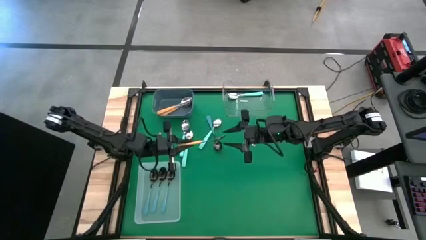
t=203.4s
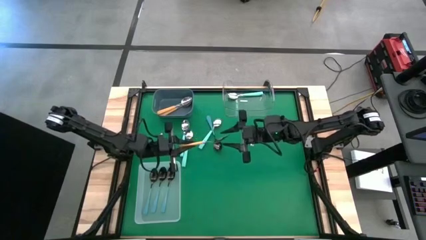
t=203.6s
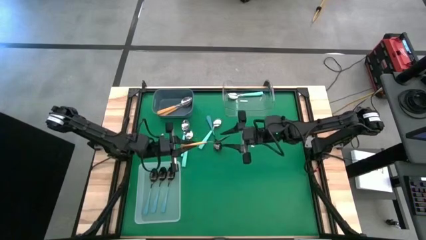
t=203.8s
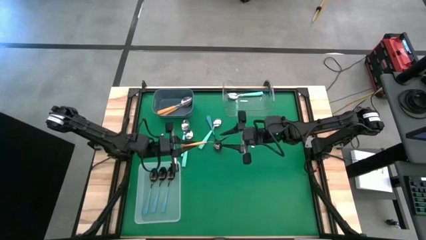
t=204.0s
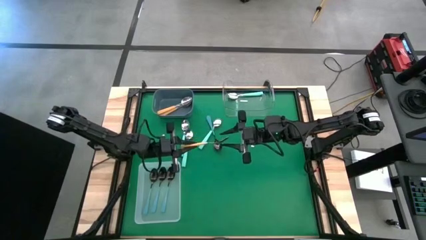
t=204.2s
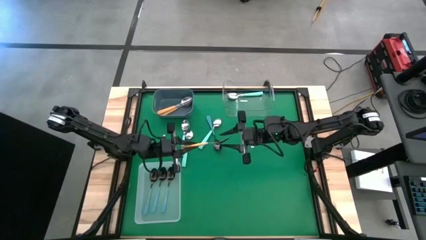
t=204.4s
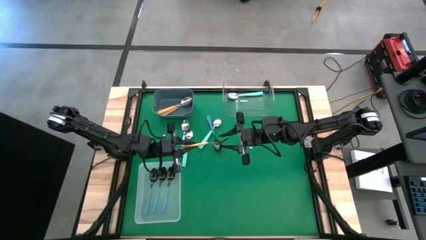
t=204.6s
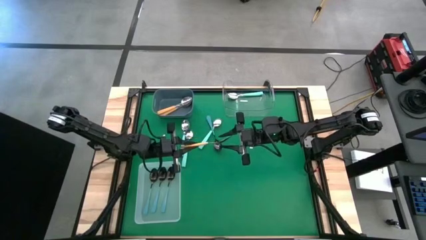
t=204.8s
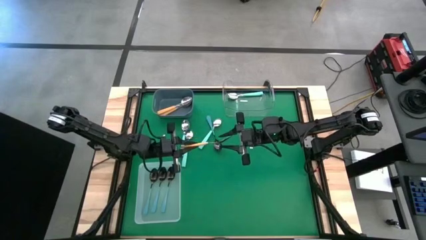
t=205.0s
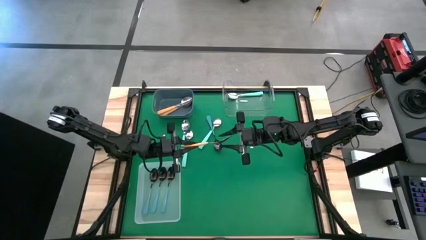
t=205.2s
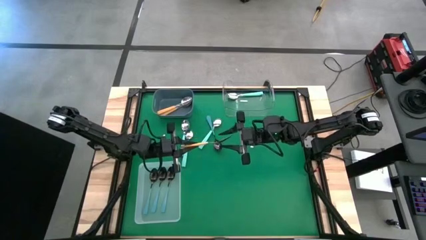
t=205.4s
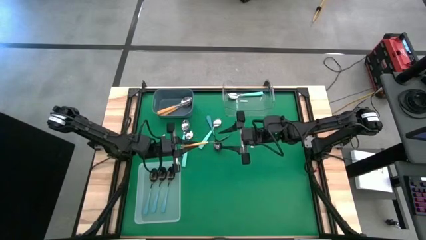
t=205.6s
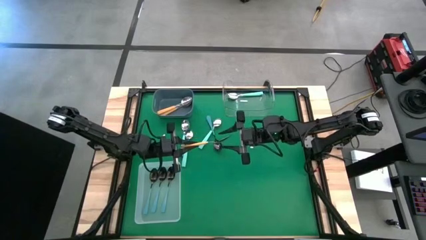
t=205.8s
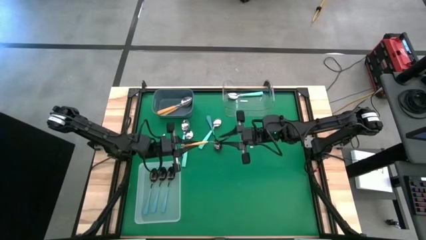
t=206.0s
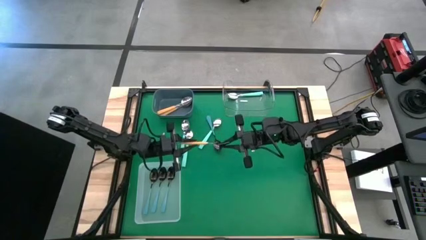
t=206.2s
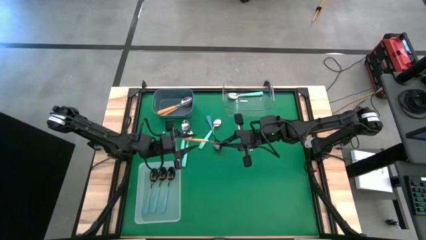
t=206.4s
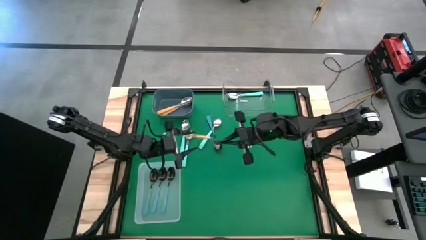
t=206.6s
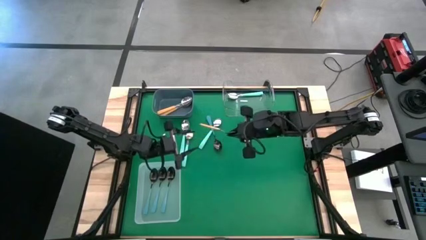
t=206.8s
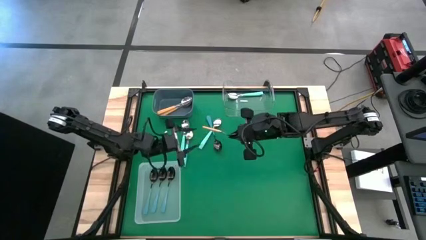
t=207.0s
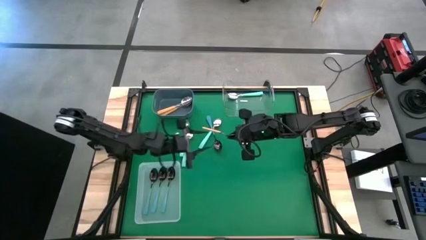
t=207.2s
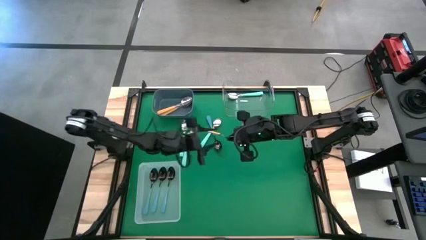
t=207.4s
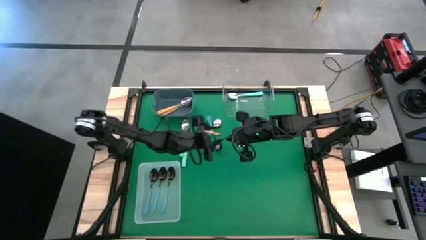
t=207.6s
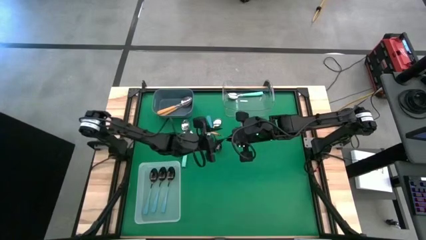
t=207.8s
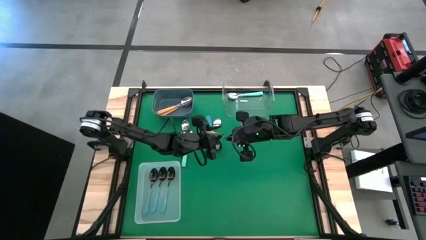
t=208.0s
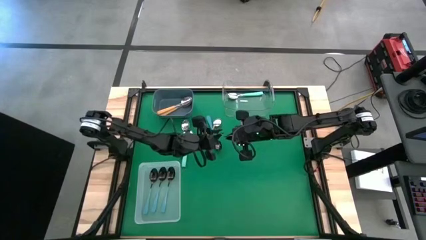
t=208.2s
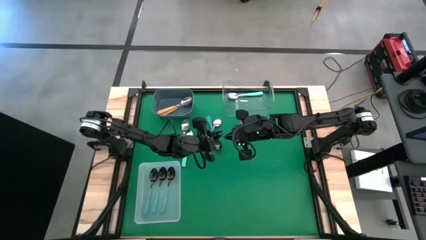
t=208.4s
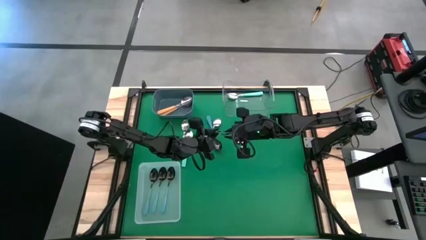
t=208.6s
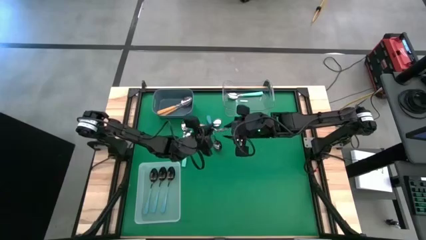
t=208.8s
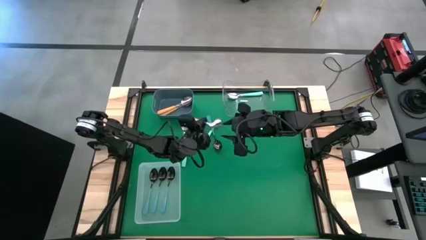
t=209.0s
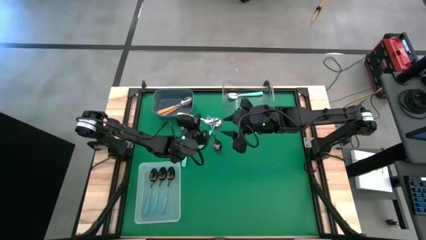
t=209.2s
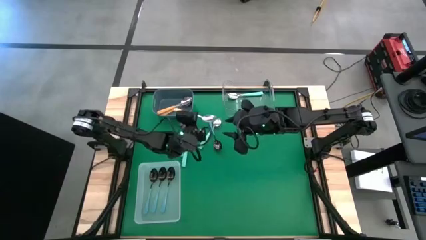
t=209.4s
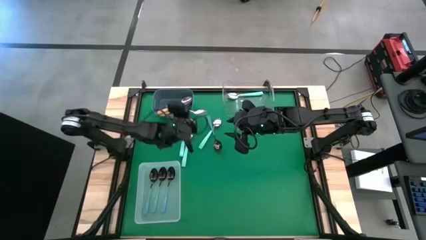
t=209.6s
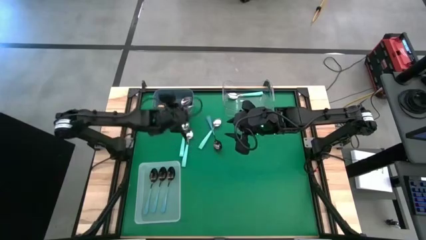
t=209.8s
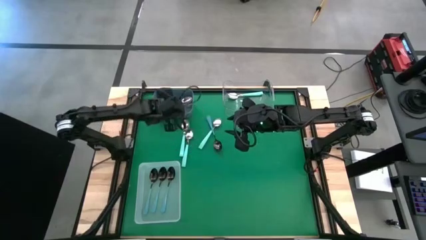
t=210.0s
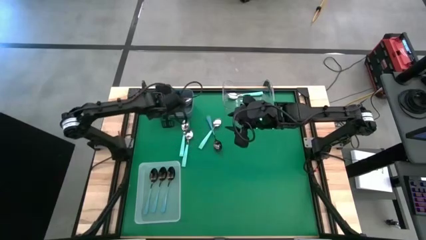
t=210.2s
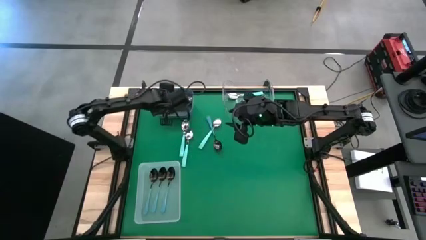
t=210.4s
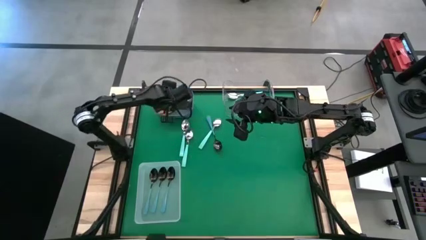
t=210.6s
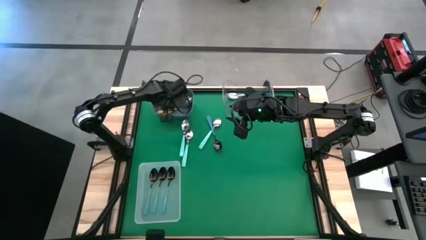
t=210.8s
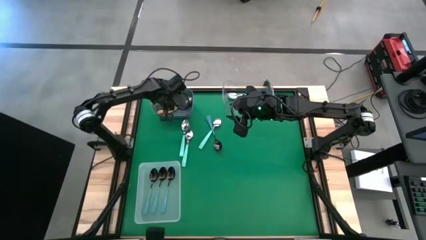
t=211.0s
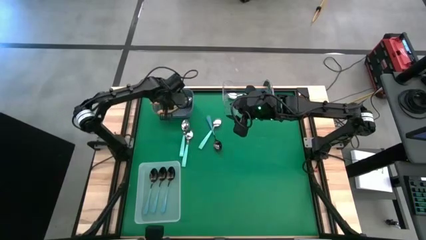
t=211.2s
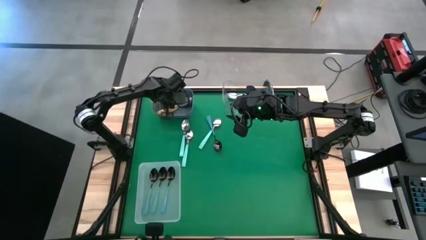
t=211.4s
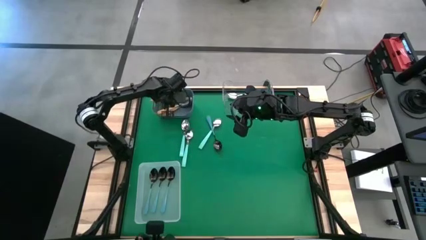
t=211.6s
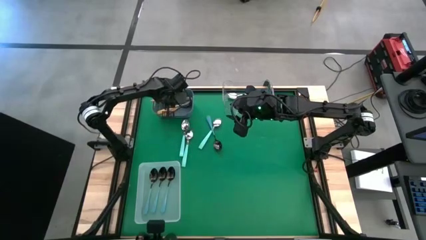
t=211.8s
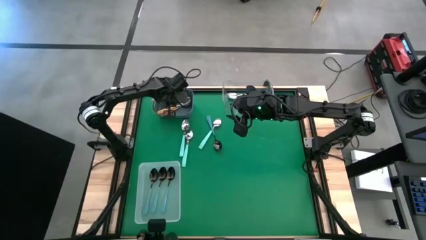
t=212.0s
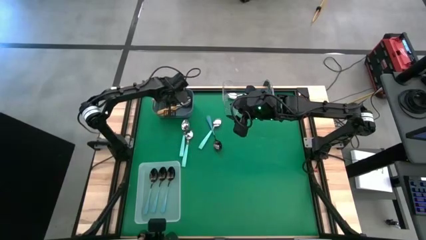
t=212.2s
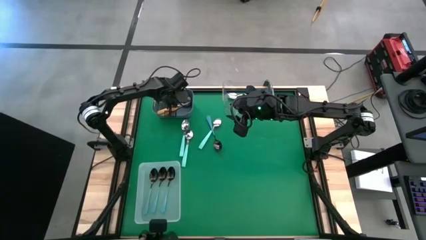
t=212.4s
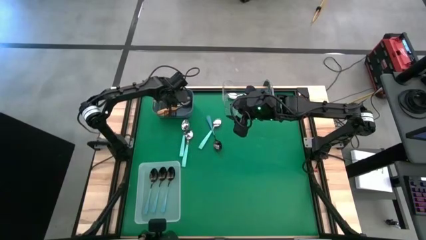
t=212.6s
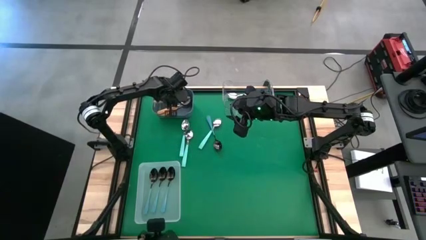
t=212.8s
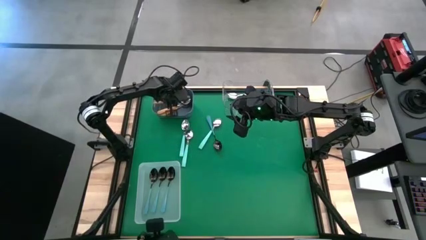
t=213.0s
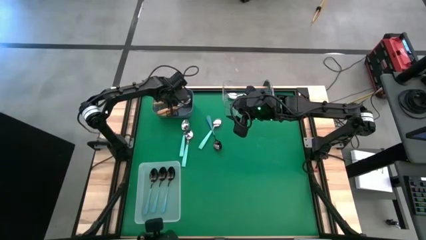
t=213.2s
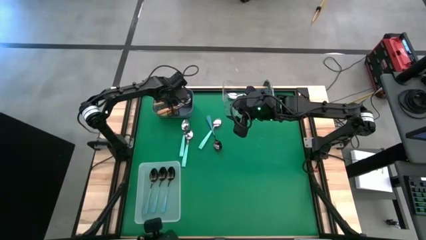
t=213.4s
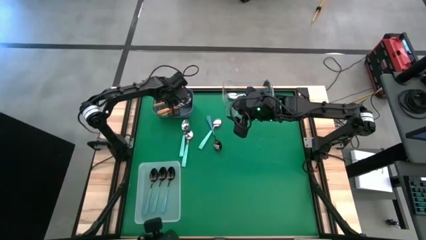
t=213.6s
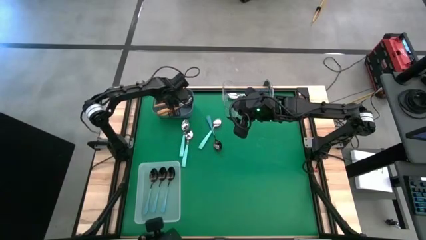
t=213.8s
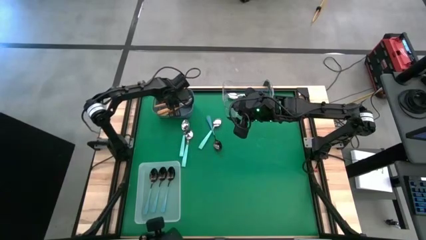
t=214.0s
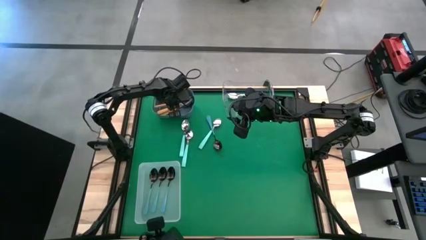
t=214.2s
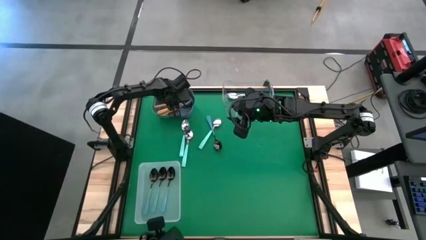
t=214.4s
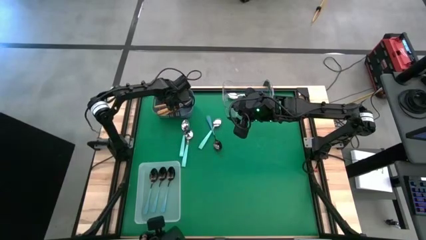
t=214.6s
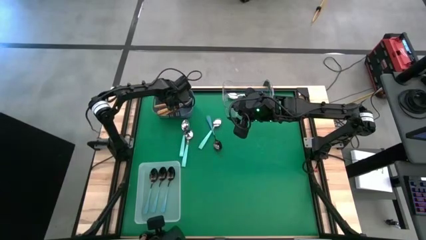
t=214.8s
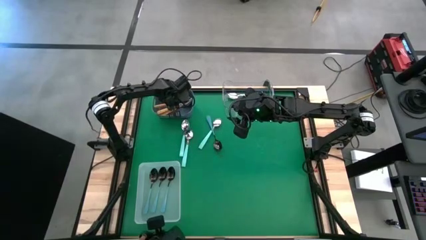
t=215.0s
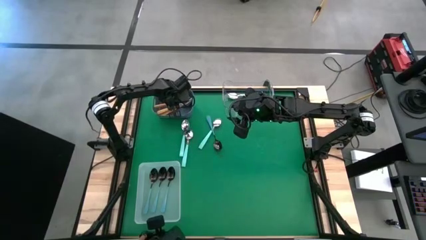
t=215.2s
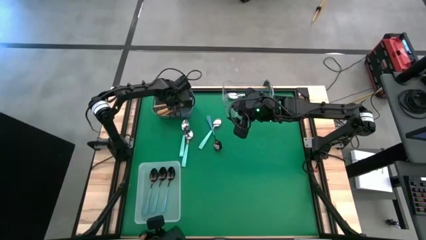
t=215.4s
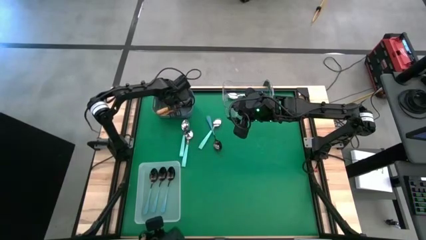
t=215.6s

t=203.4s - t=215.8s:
Task: Sort silverware by color (type)
Put the yellow spoon into the gray bin

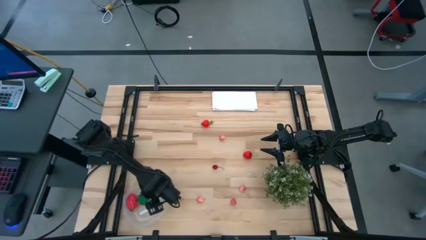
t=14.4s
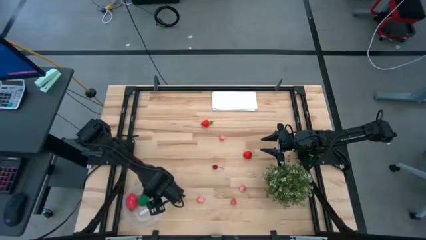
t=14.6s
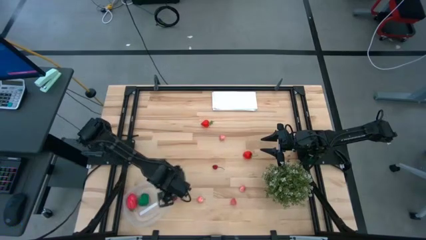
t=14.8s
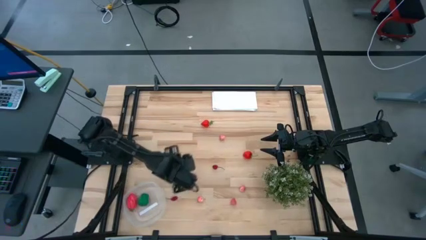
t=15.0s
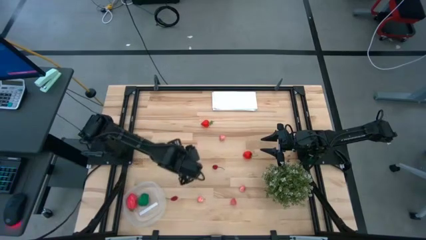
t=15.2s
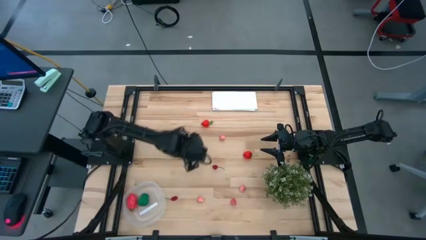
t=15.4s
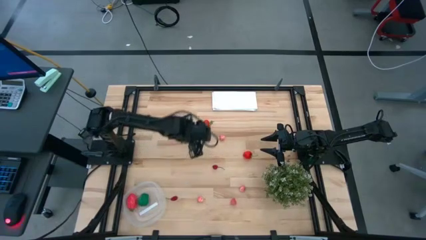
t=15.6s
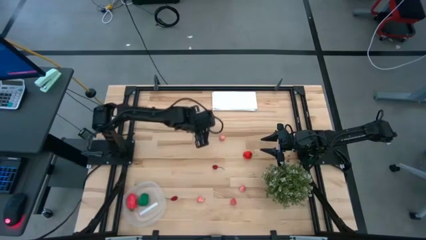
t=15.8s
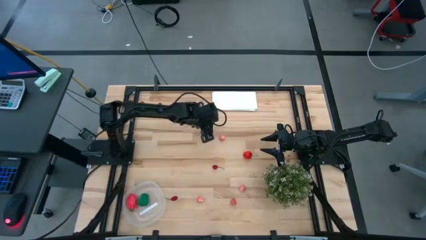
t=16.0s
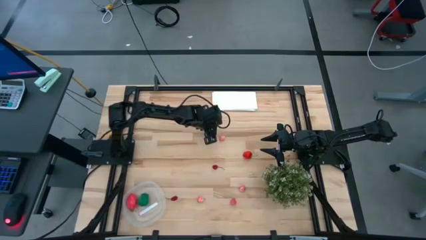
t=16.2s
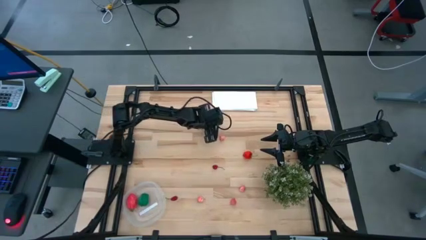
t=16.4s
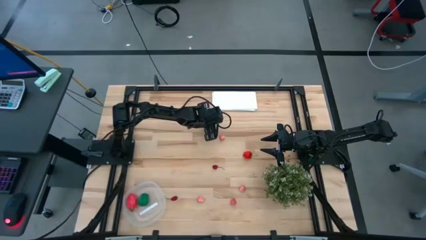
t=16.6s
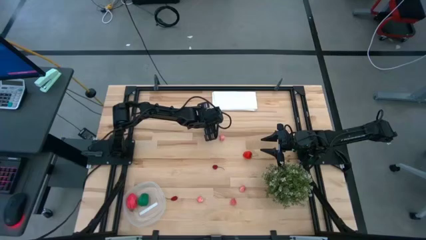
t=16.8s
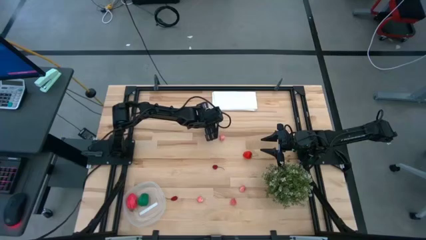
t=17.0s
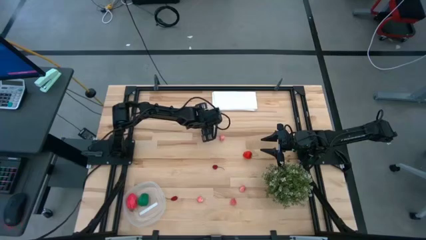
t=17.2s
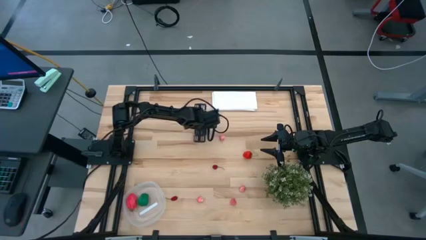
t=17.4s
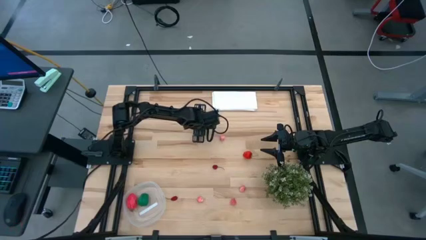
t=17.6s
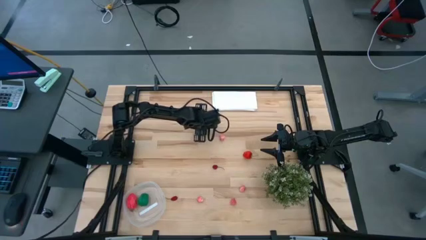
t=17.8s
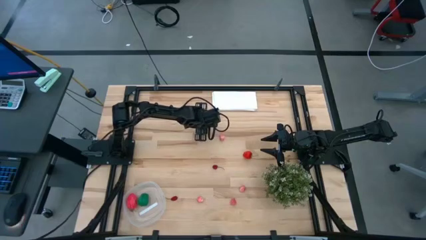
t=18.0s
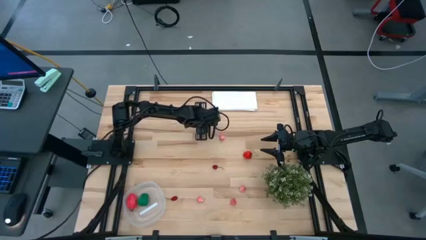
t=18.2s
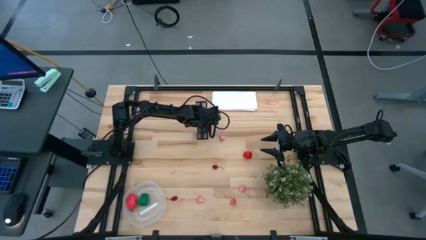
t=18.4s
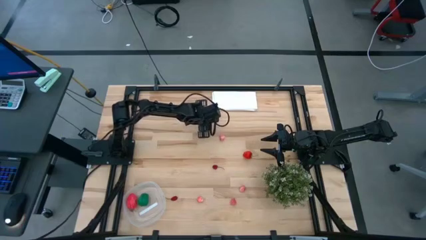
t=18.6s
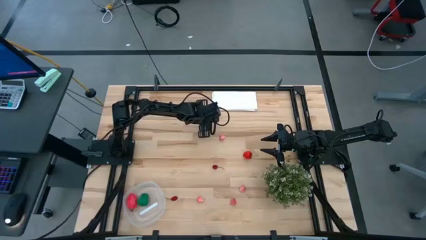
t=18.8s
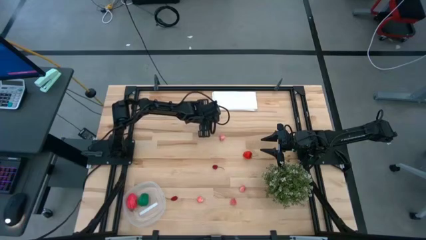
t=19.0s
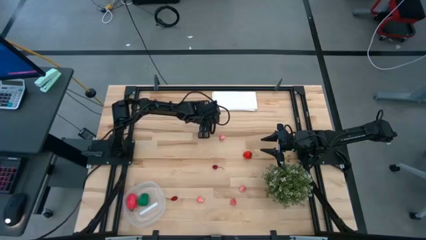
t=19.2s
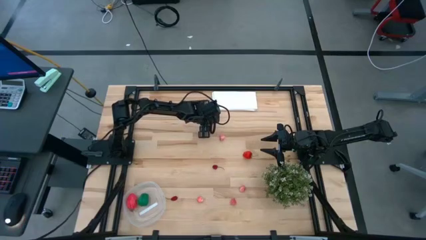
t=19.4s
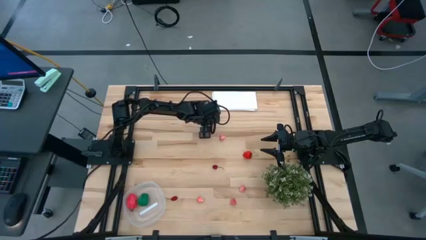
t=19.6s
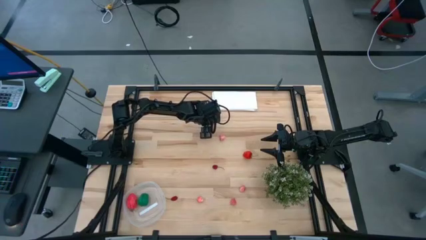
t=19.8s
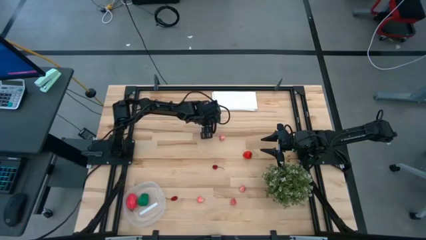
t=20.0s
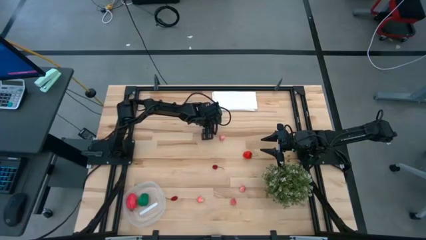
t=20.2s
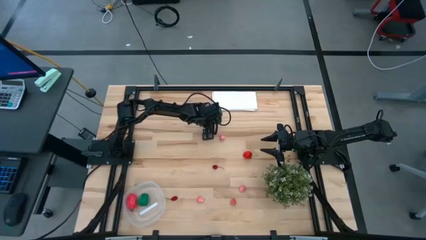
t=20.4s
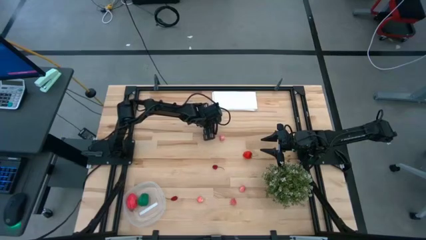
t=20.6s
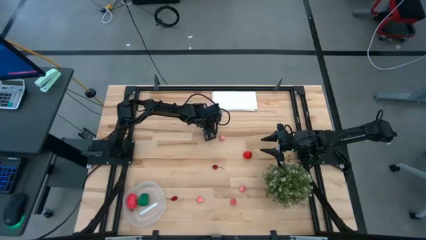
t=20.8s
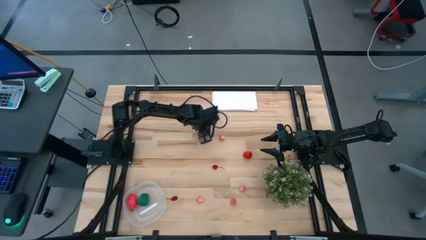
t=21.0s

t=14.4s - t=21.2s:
Task: Pick and placing Produce into tupperware
Put the strawberry into the transparent plastic container
